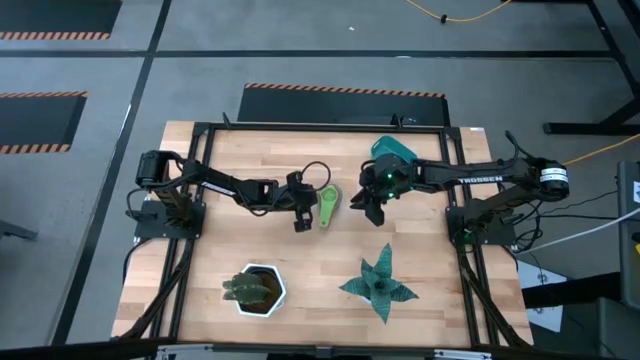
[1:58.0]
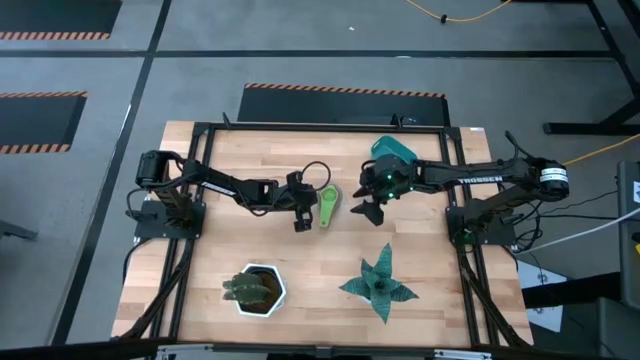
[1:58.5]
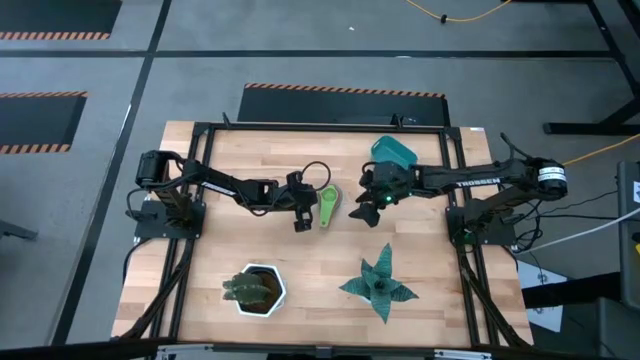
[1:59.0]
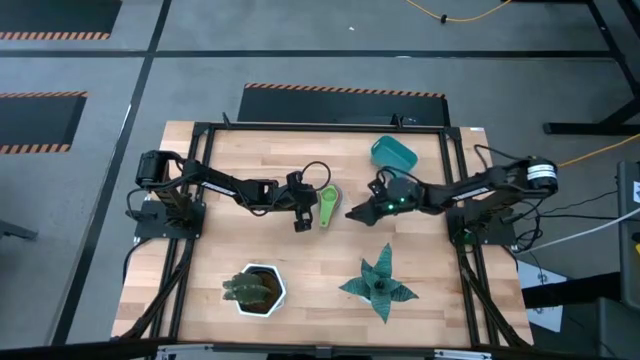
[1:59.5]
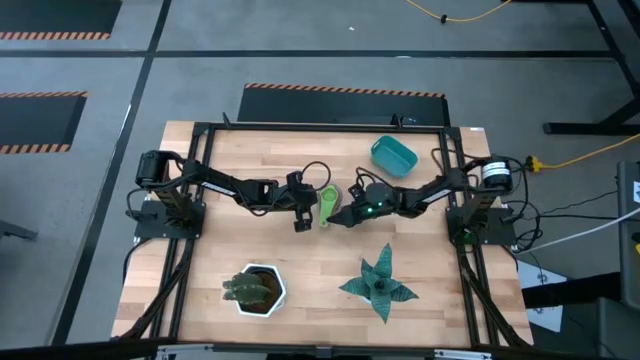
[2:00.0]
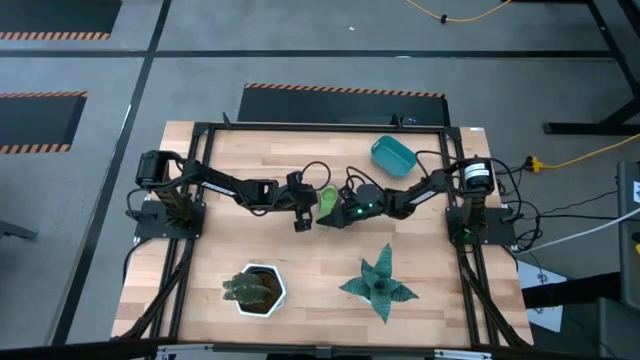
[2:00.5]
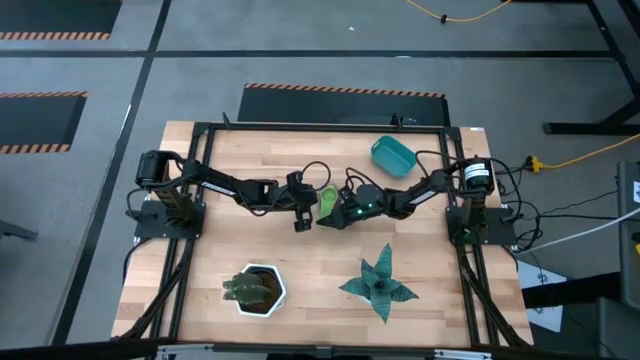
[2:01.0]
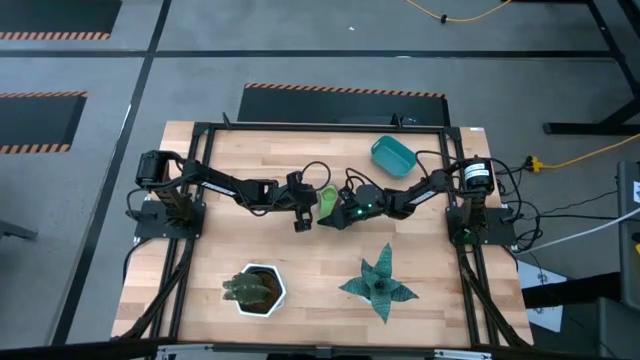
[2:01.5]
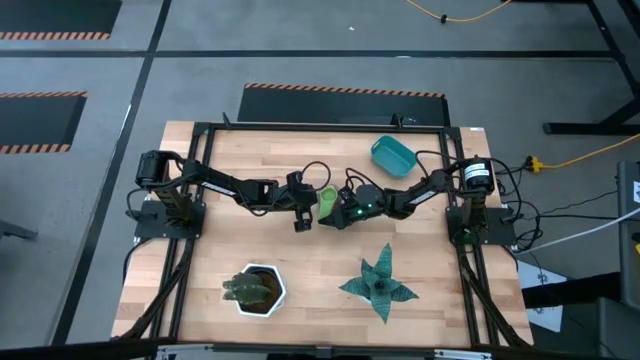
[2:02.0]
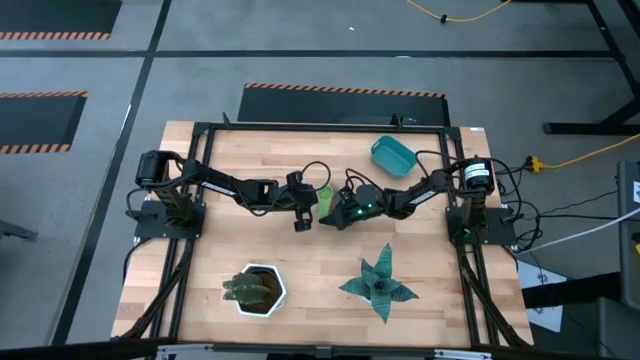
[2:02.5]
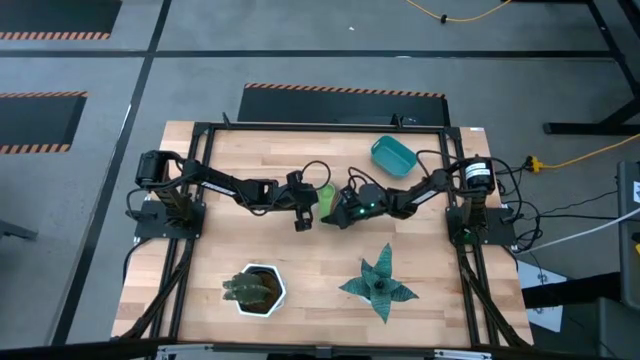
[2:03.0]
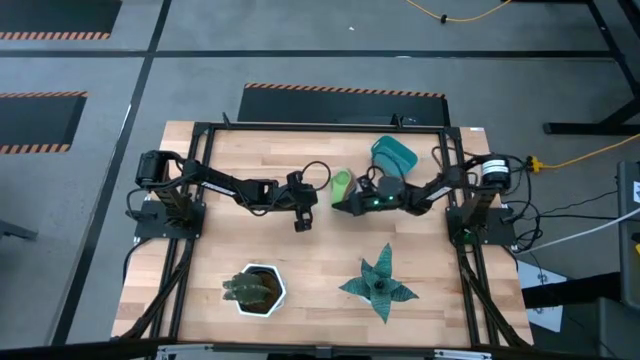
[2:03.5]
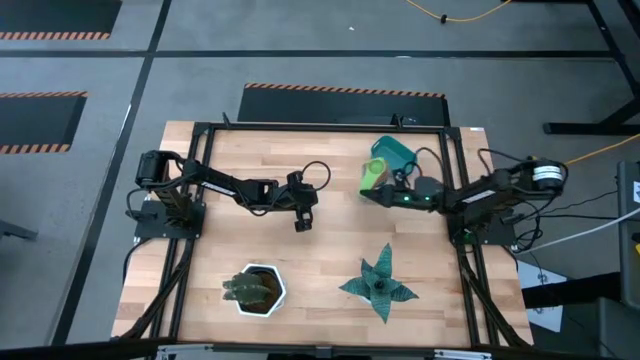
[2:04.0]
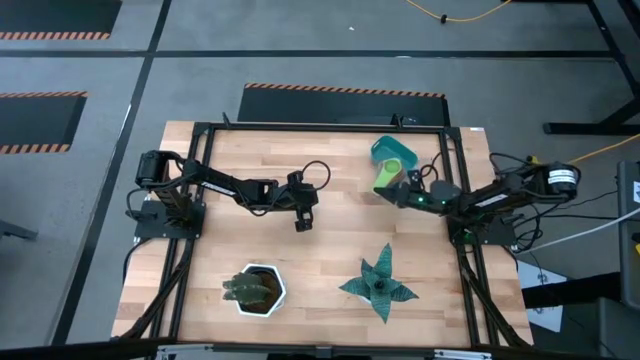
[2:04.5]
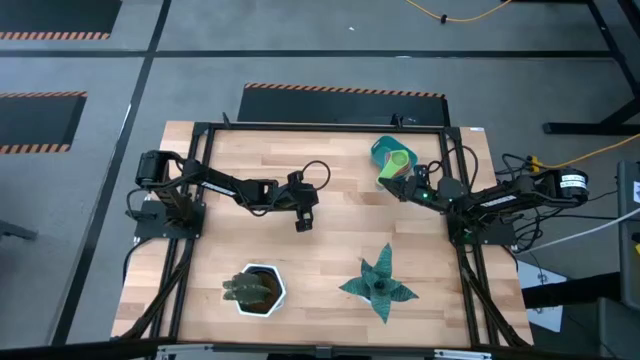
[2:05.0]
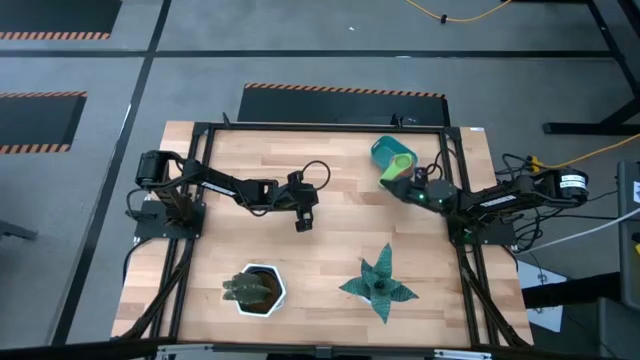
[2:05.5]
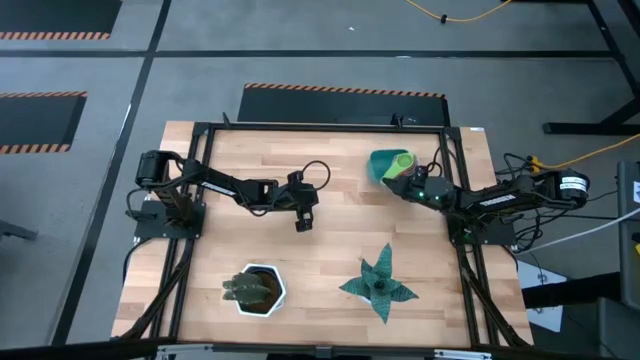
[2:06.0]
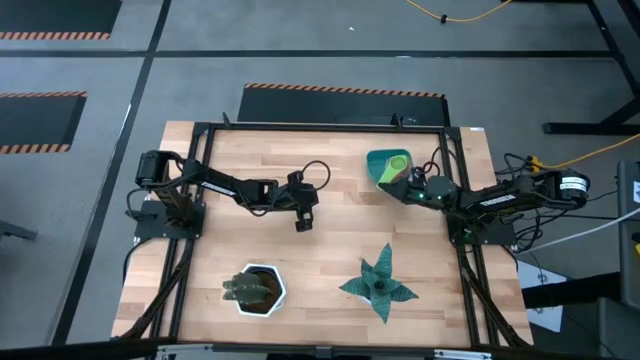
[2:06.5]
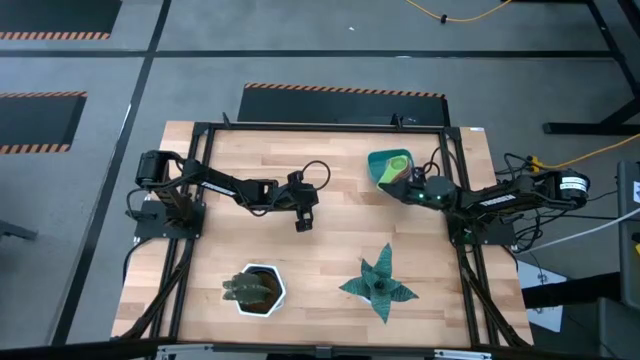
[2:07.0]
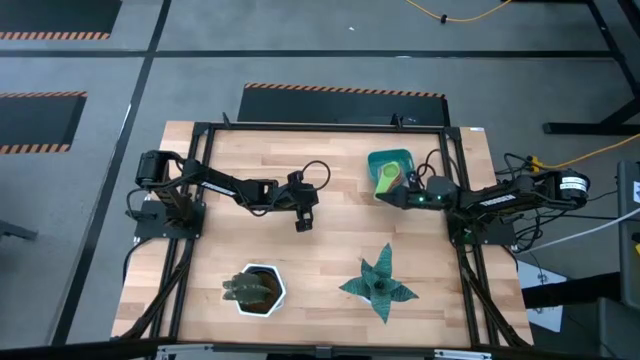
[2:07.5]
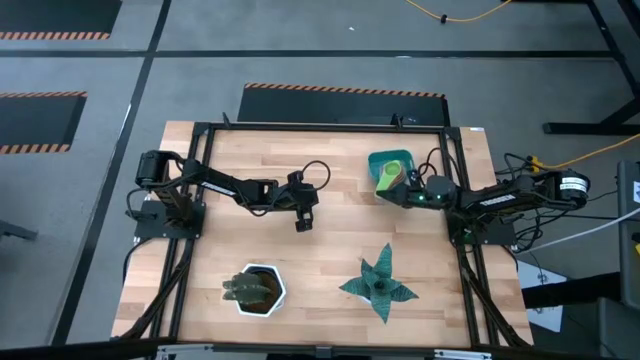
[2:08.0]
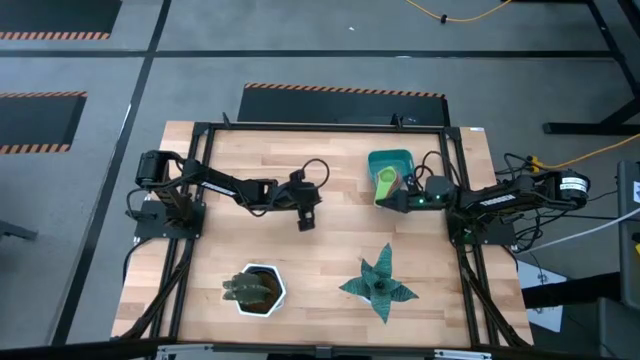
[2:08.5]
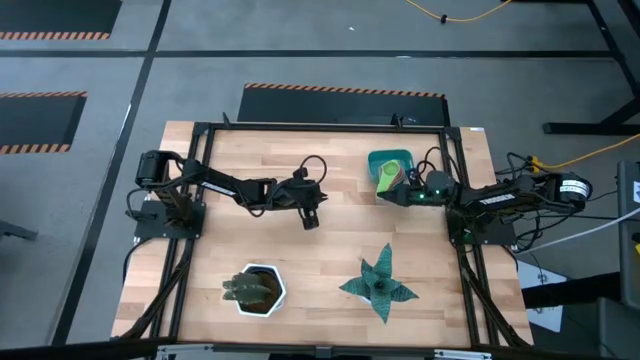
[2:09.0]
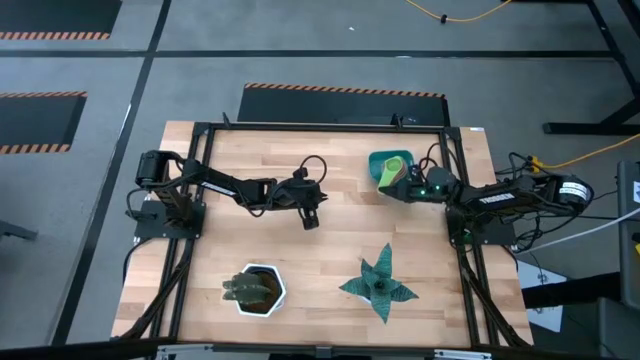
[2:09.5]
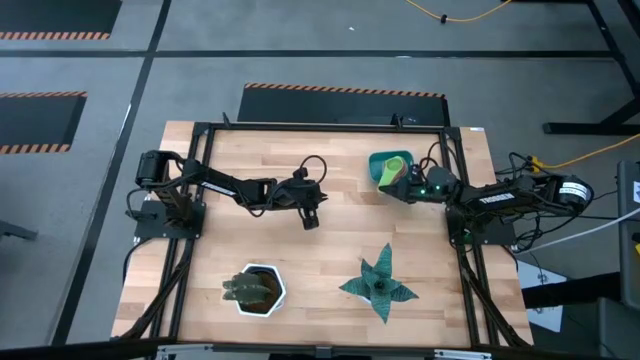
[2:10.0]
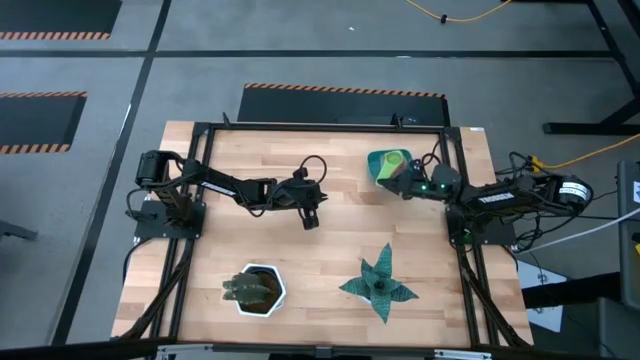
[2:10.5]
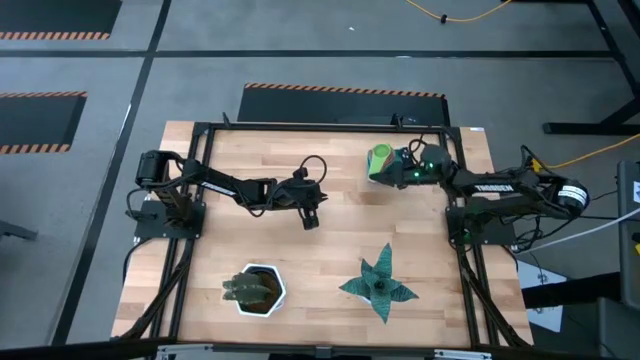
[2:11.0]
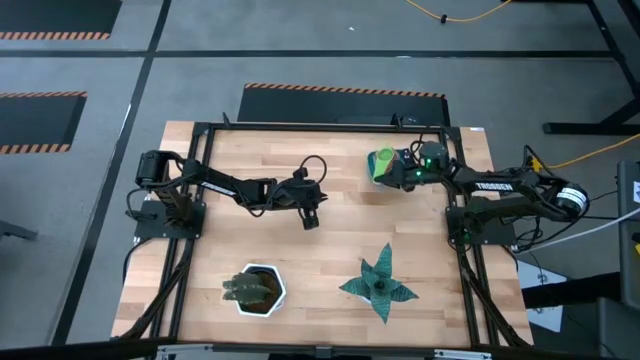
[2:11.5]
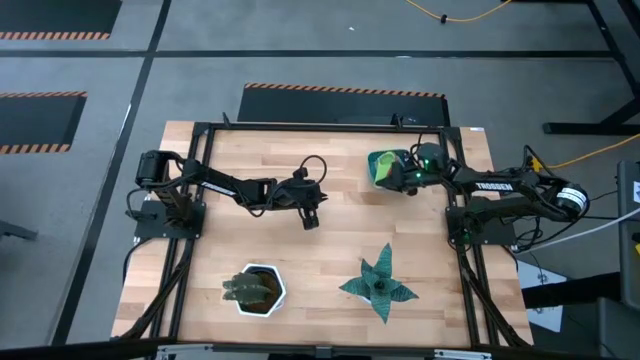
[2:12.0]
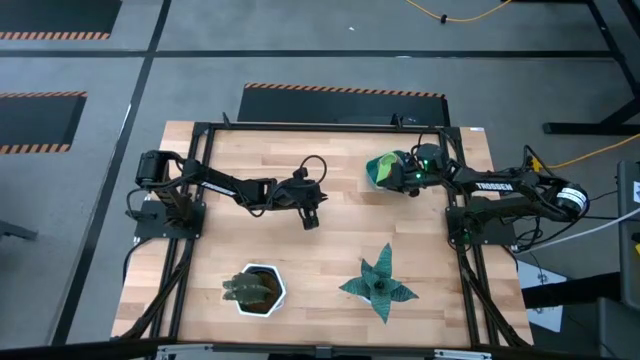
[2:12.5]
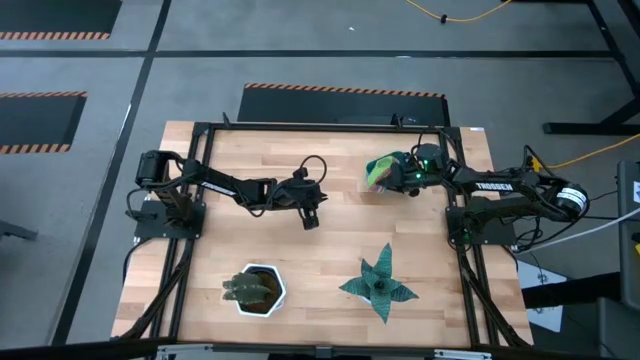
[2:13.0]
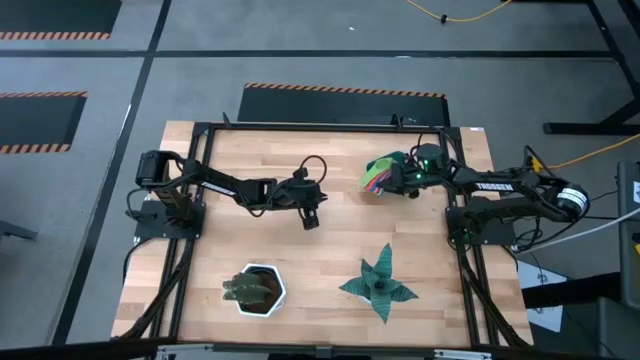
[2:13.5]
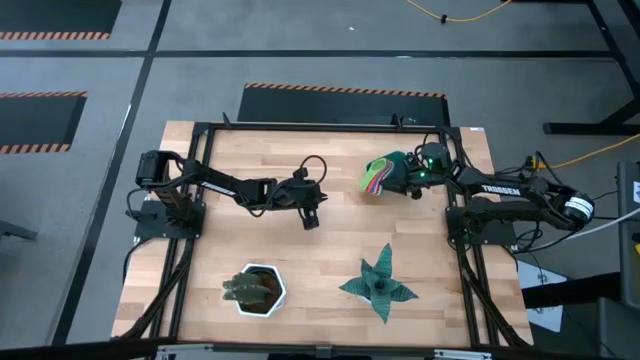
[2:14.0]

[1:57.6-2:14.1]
Task: Nest measuring cups in basket
Put the stacked measuring cups into the blue bin

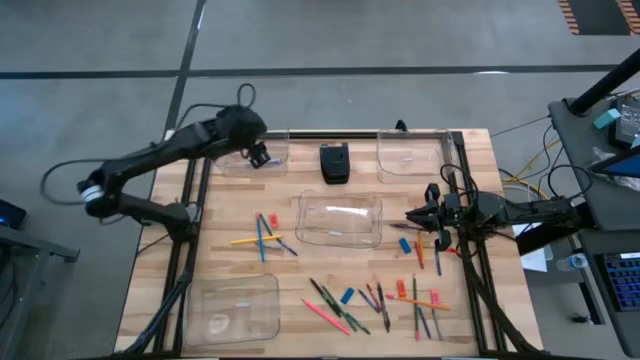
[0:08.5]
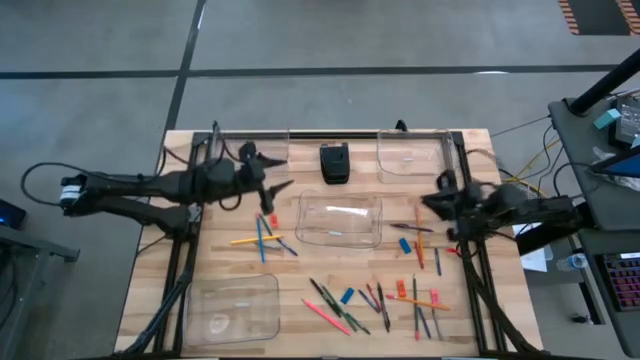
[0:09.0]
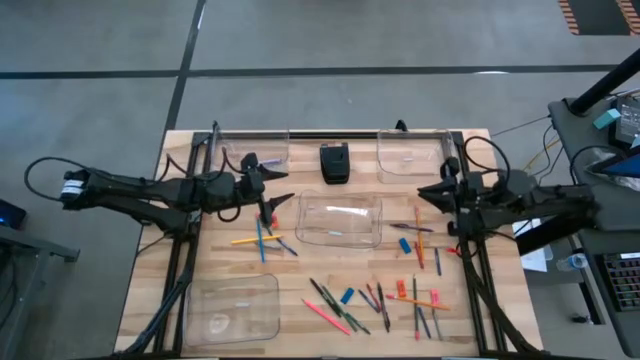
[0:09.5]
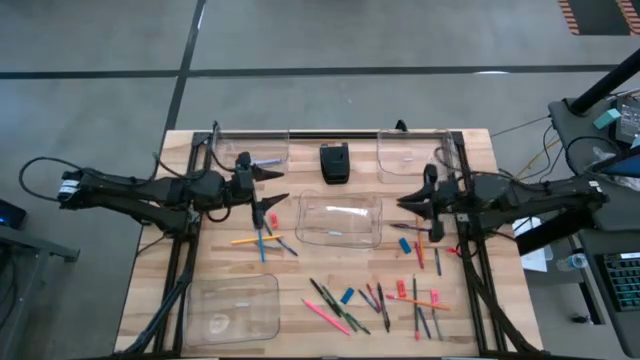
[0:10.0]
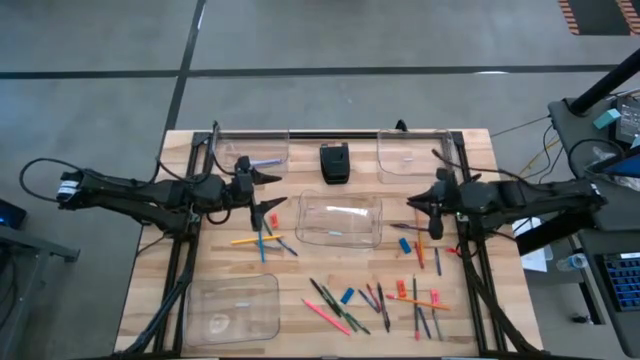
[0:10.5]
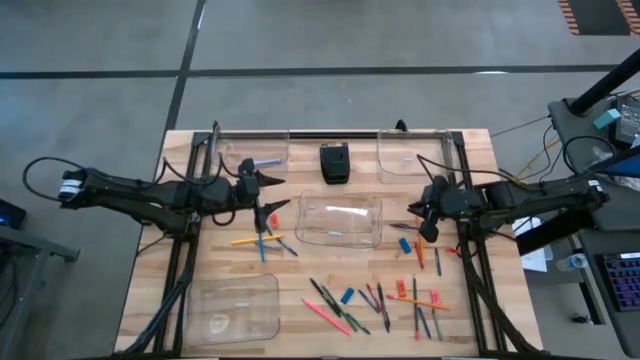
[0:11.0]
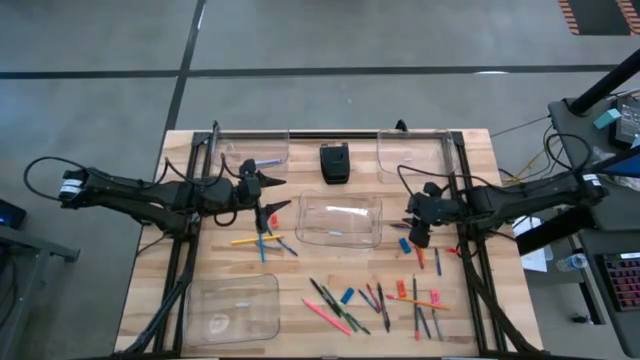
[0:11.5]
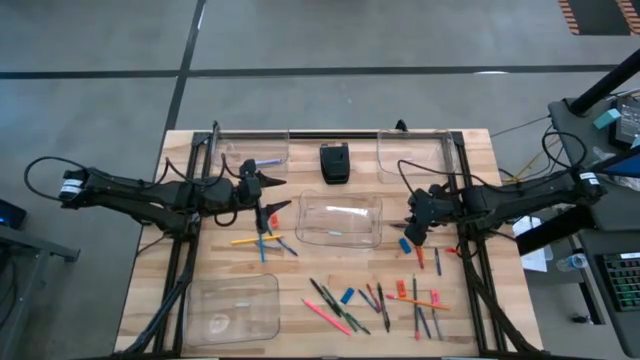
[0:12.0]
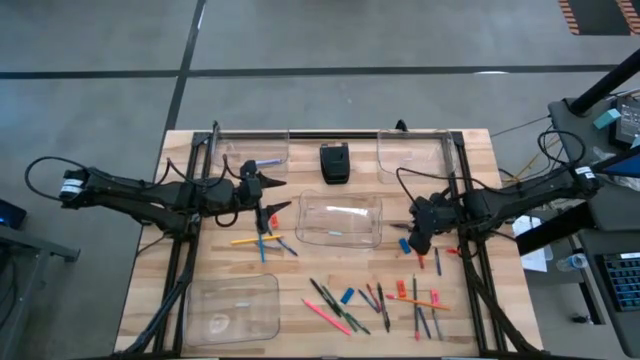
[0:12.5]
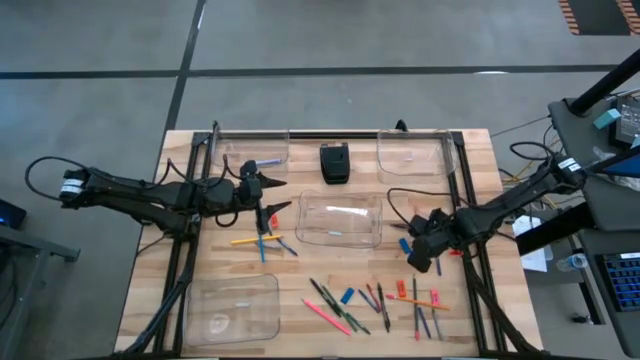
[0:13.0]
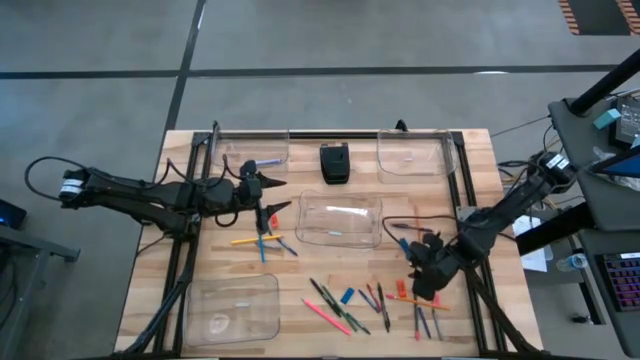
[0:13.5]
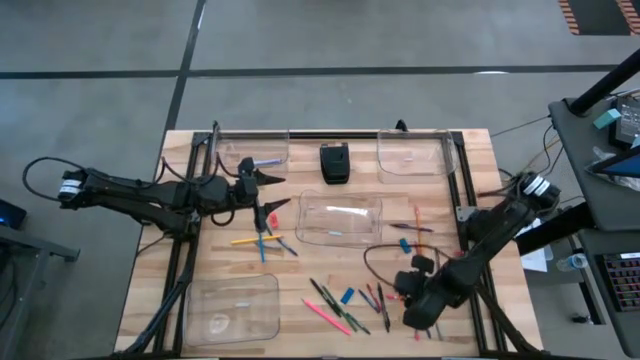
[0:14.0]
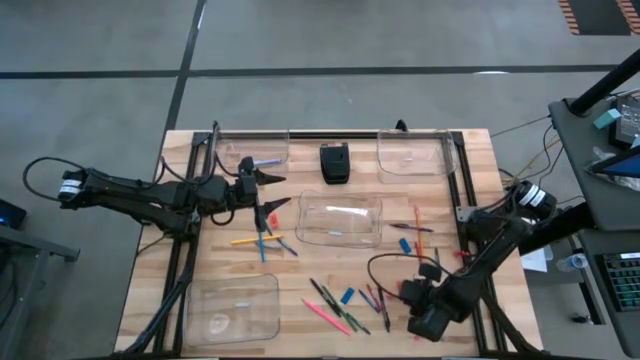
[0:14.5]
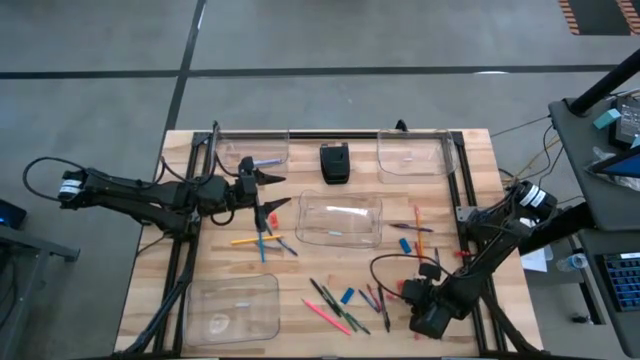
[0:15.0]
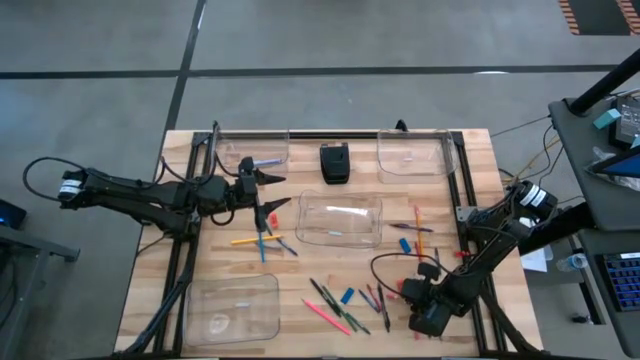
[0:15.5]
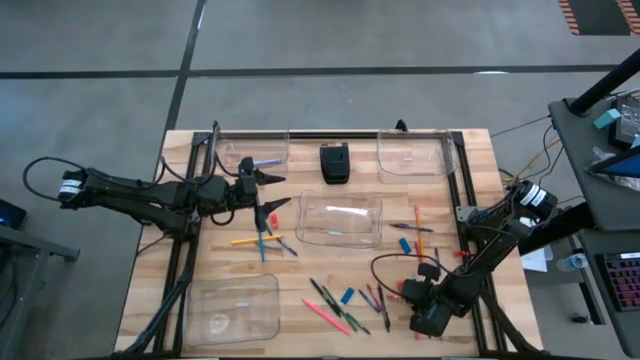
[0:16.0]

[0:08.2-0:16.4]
Task: Sort crayons/erasers/pens/pencils in bins
Put the orange pencil into the middle transparent bin
